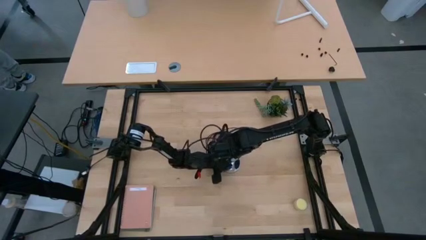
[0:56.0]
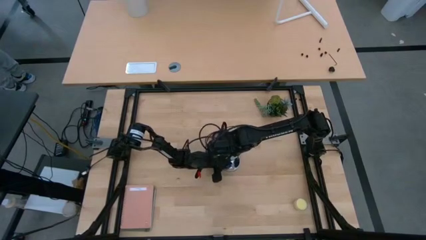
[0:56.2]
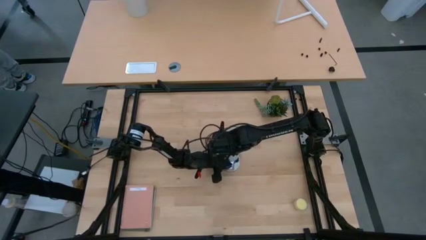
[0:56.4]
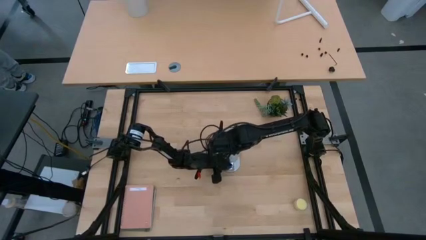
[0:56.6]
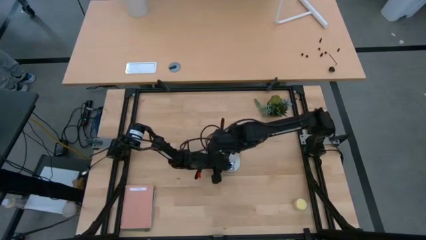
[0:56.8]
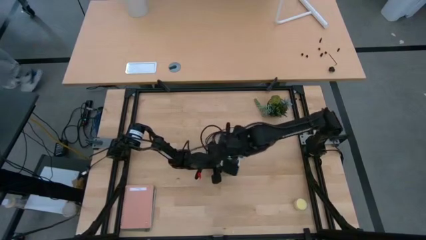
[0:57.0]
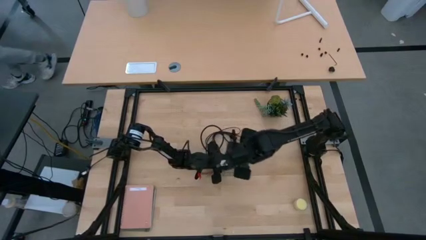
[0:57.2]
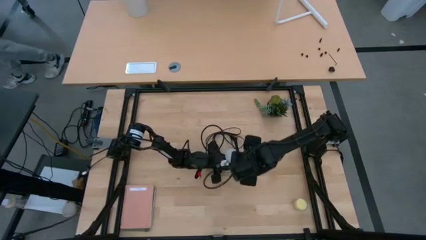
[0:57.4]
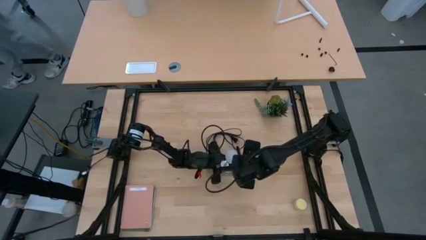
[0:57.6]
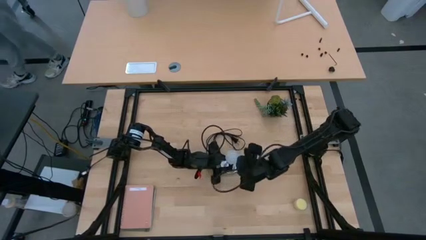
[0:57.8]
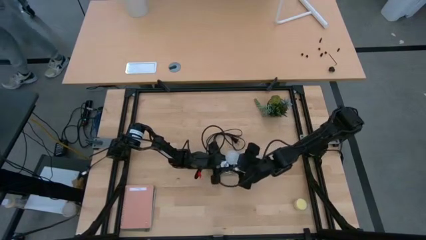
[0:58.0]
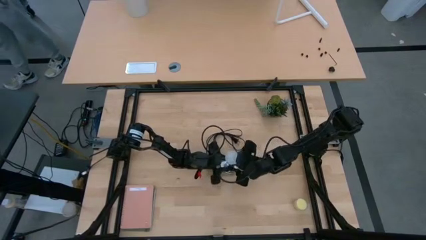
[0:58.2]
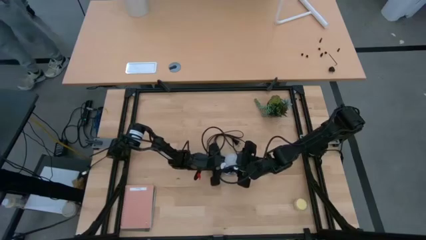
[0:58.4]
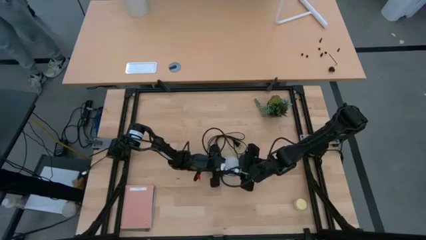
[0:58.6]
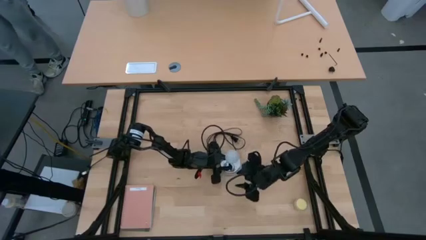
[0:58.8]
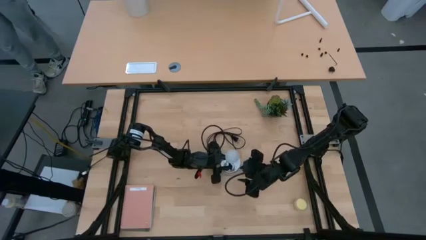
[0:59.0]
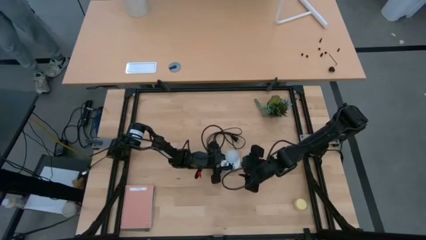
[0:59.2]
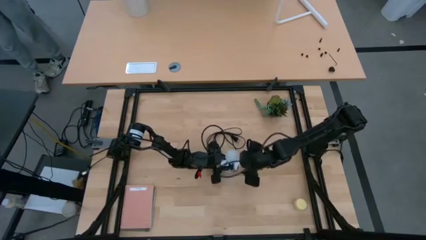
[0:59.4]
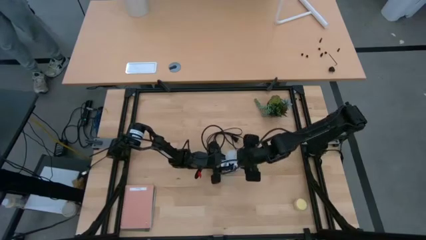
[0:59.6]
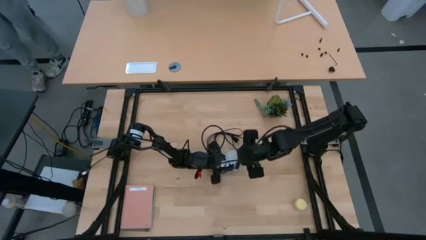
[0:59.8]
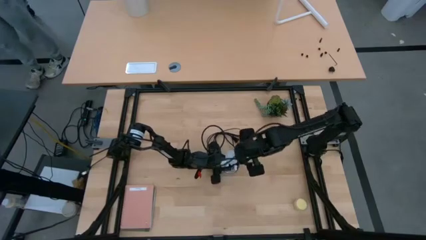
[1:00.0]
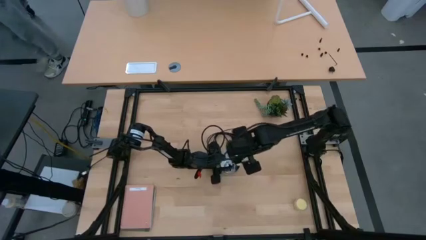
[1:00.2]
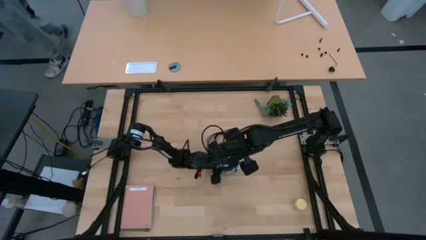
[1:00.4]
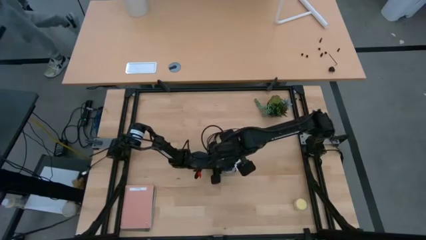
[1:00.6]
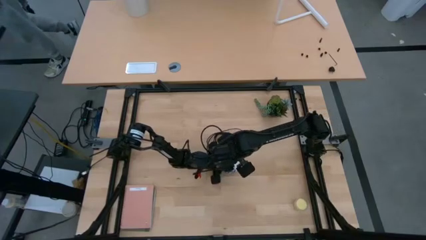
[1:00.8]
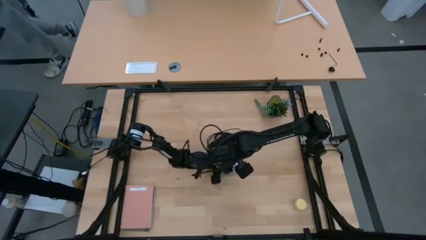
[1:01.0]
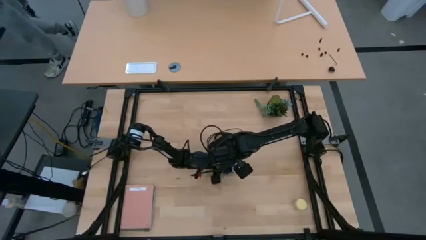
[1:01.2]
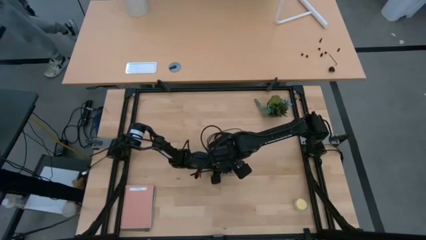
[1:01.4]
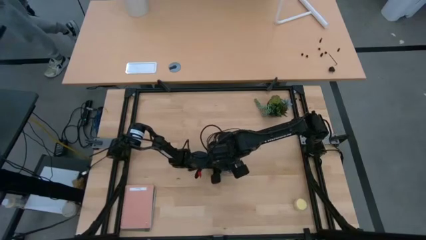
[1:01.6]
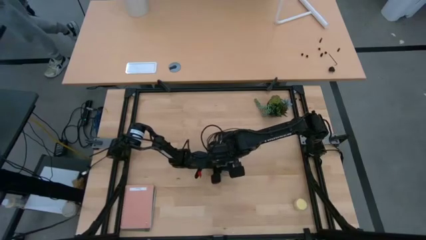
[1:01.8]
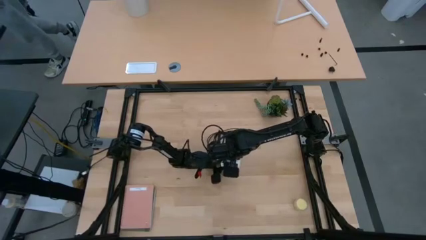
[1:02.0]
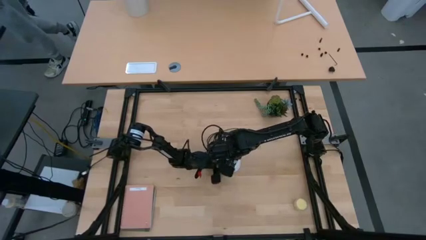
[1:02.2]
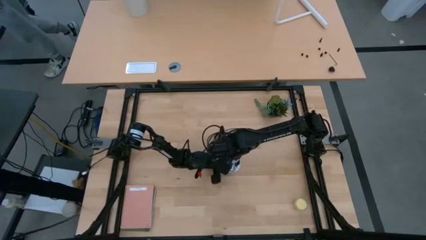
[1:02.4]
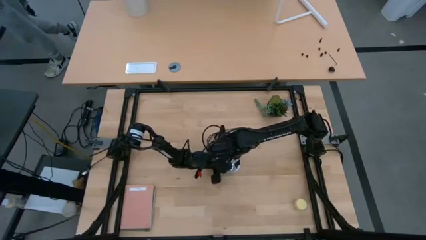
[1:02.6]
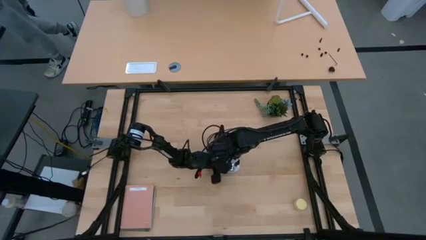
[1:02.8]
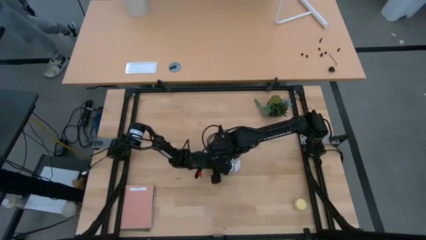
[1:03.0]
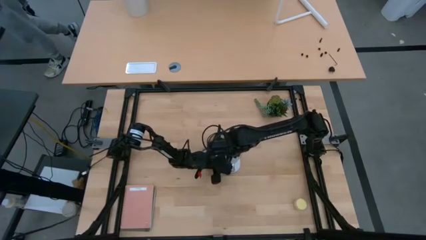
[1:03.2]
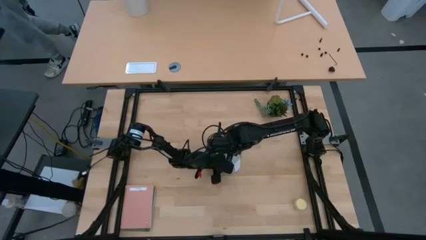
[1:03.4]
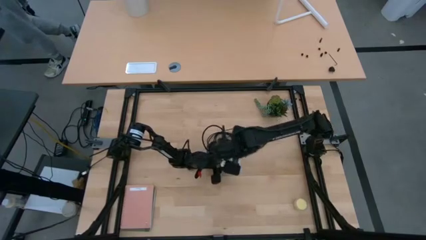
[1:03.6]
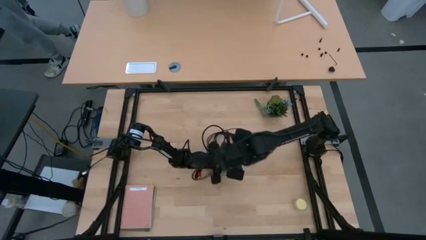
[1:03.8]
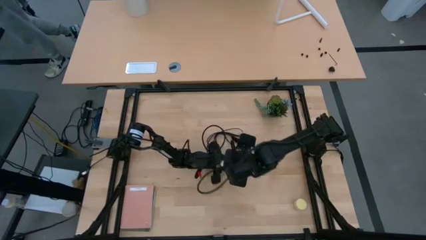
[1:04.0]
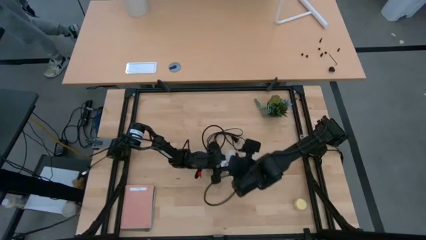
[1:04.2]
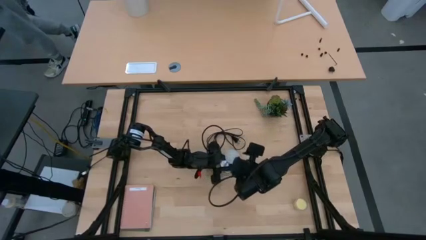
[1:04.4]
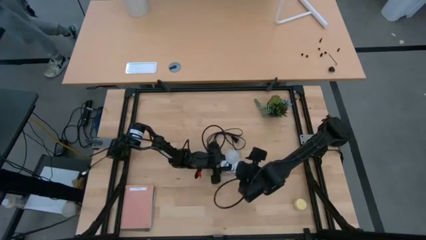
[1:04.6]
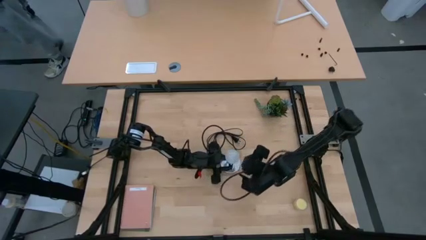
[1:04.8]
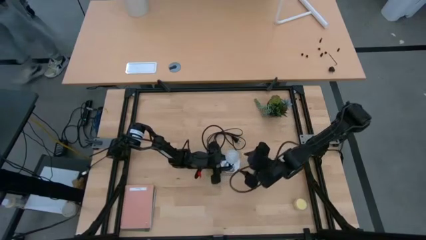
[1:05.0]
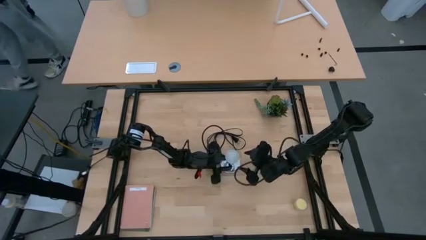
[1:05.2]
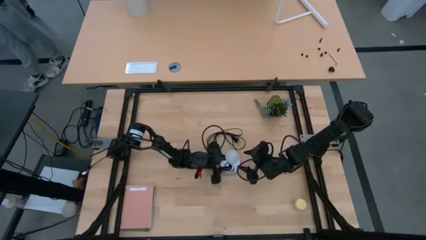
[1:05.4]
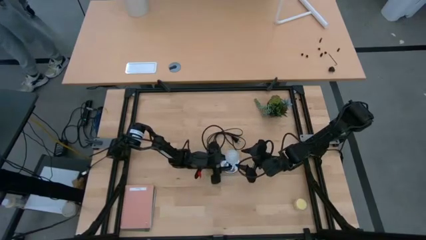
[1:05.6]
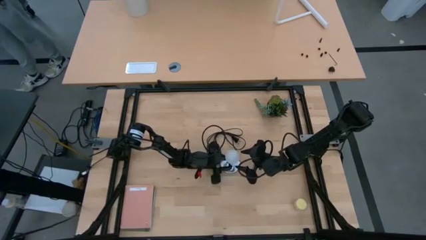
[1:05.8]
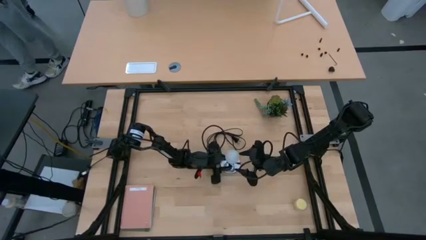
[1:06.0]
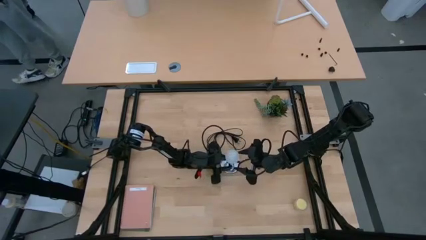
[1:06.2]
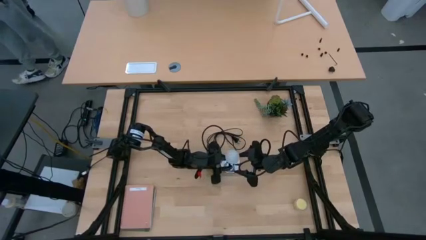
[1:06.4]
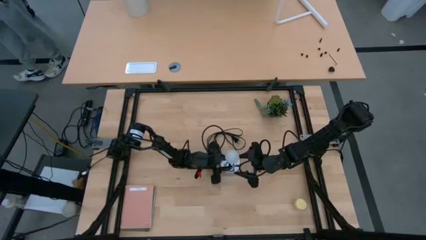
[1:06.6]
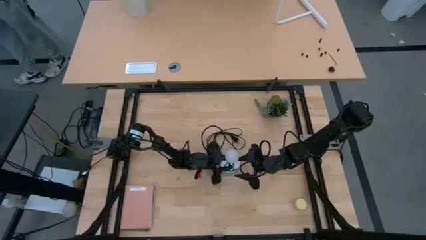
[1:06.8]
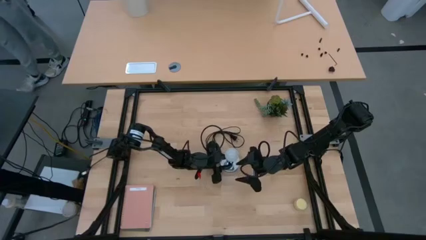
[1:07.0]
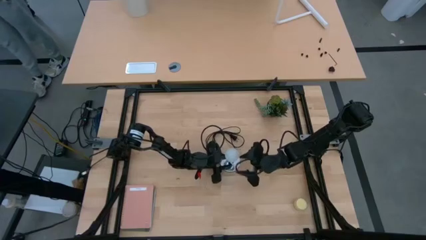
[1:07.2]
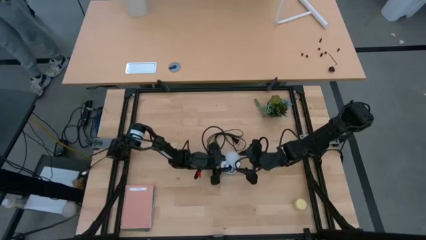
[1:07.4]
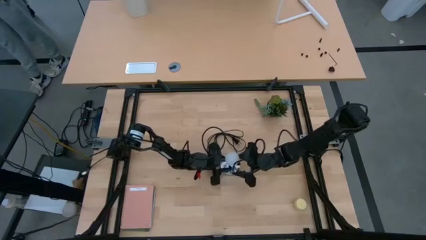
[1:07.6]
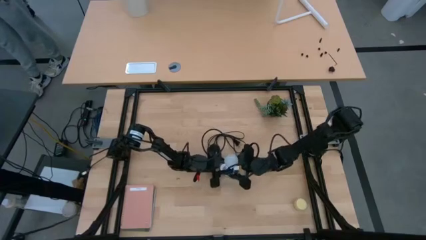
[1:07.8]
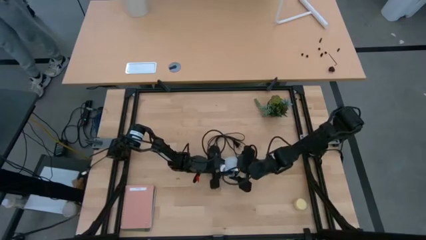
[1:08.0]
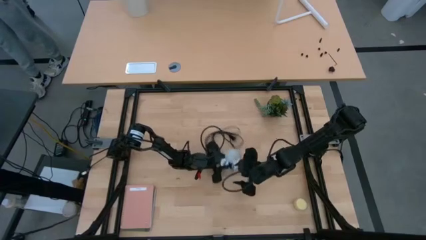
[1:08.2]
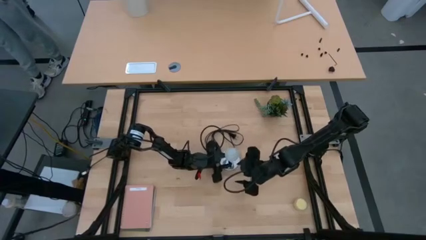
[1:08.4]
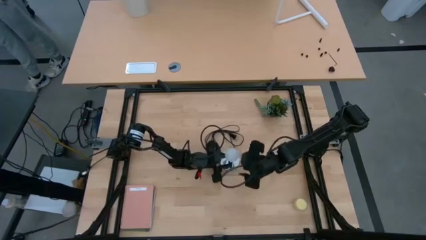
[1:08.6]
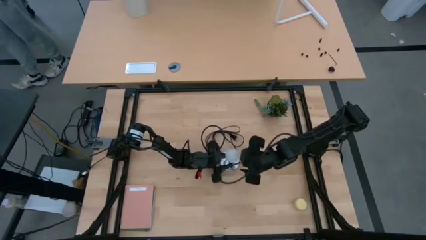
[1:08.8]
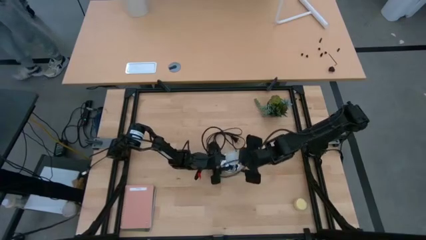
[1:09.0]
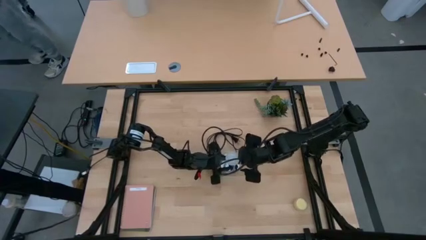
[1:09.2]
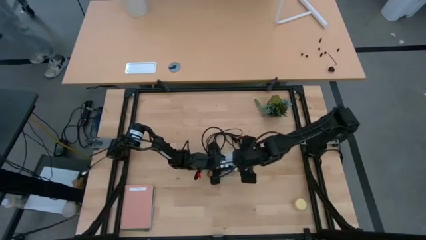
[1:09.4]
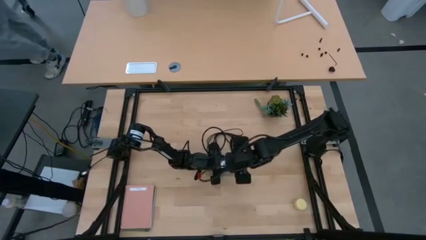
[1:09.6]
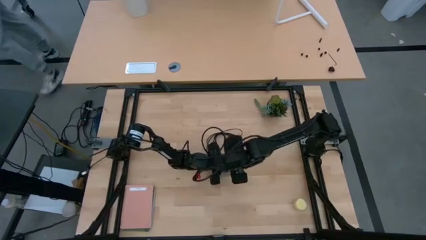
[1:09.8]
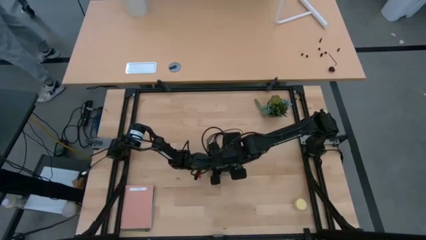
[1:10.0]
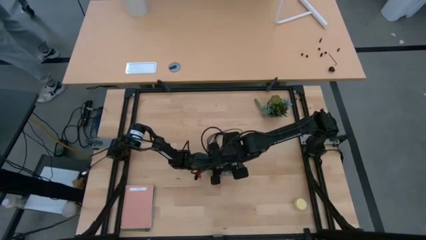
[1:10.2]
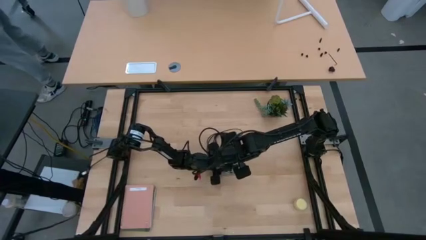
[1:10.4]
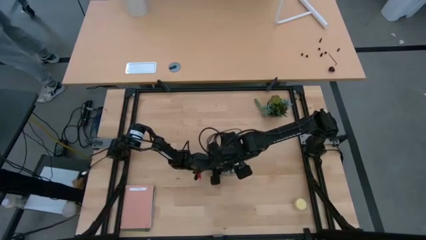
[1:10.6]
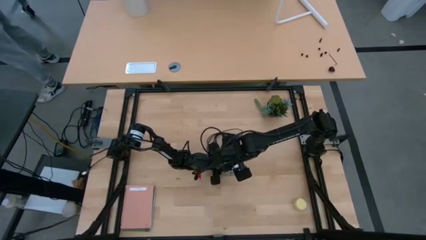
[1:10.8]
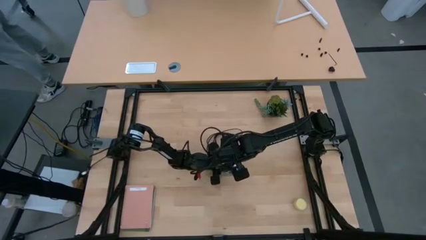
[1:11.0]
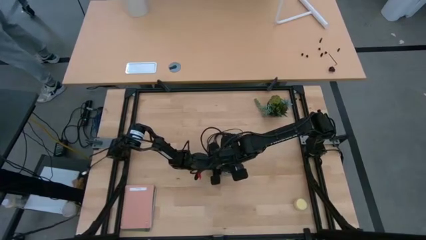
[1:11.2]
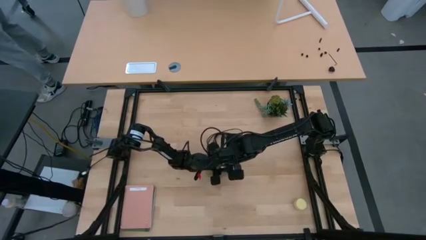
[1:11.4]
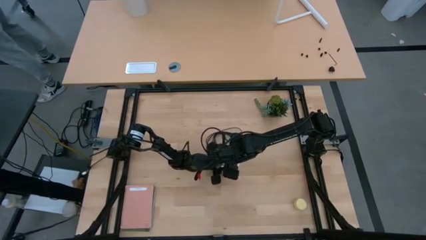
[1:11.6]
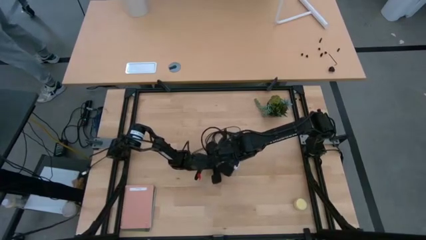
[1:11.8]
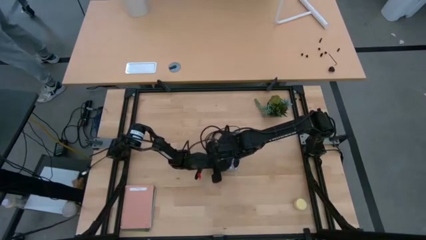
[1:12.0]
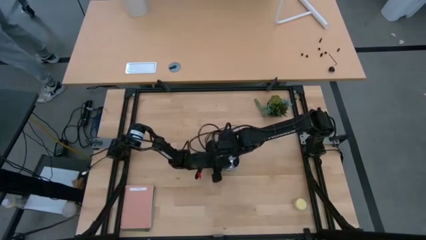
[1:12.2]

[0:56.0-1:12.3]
Task: Screw lightbulb
Insert the lightbulb into the lamp
